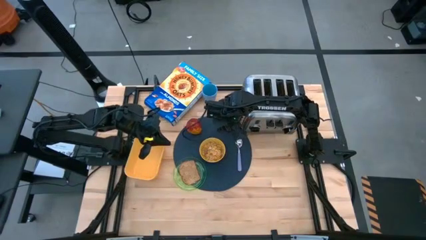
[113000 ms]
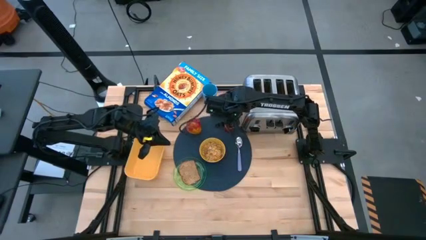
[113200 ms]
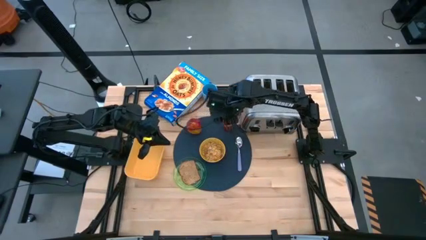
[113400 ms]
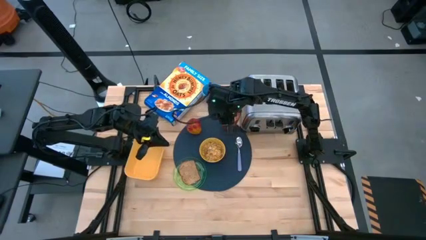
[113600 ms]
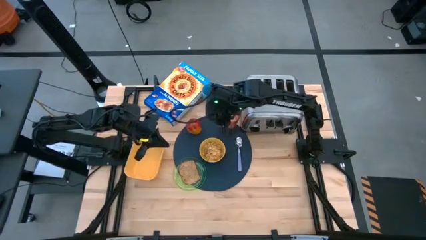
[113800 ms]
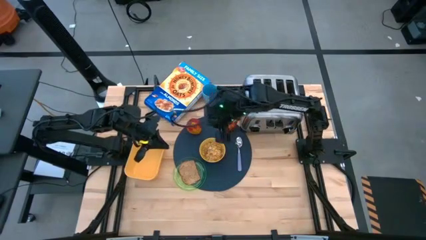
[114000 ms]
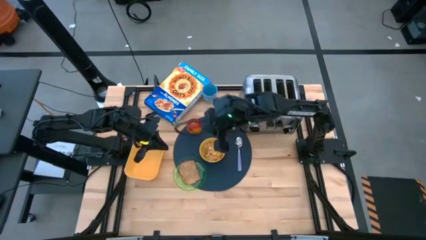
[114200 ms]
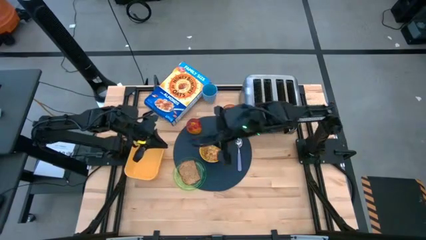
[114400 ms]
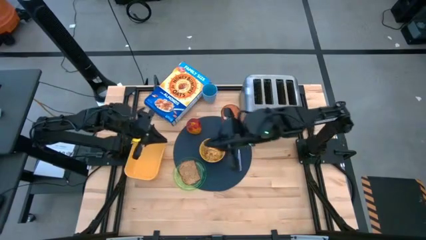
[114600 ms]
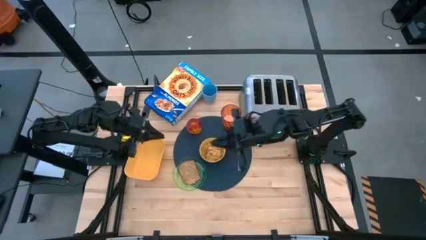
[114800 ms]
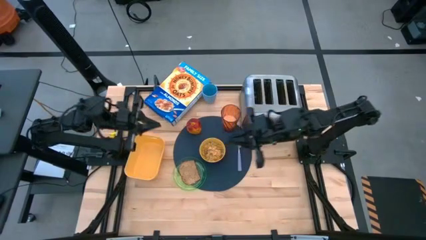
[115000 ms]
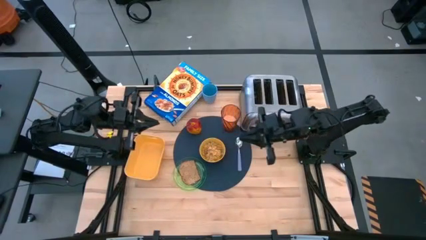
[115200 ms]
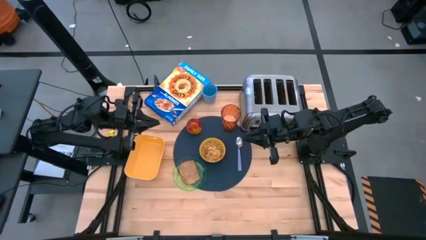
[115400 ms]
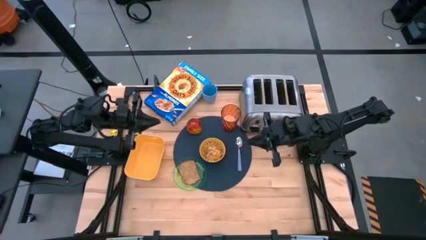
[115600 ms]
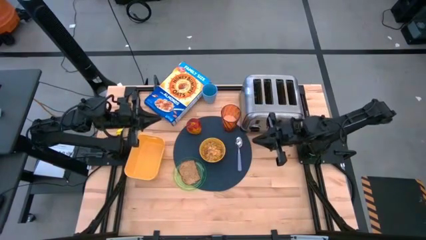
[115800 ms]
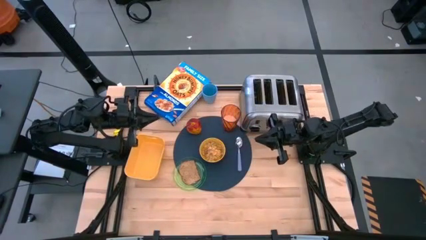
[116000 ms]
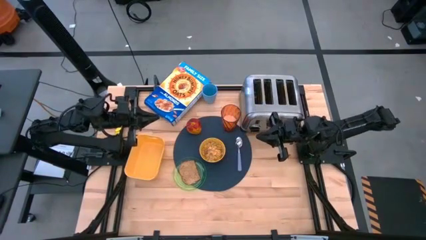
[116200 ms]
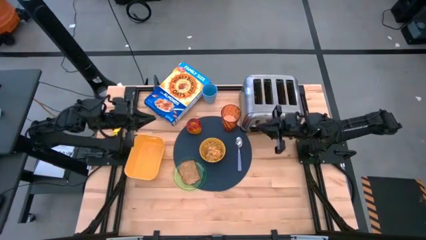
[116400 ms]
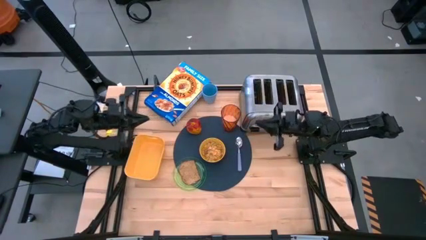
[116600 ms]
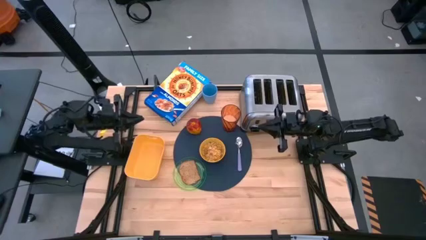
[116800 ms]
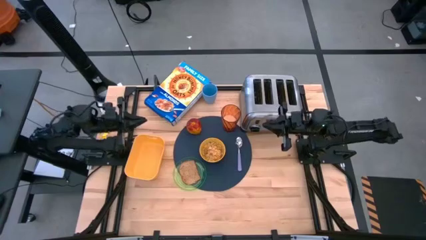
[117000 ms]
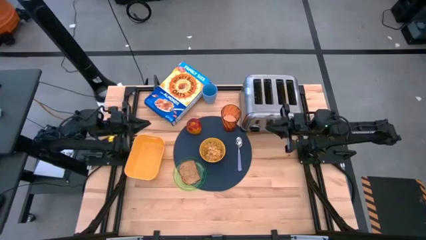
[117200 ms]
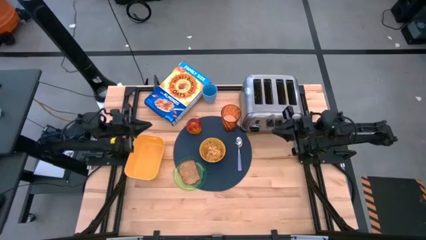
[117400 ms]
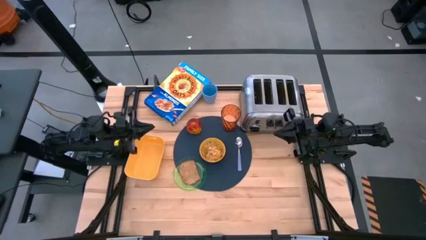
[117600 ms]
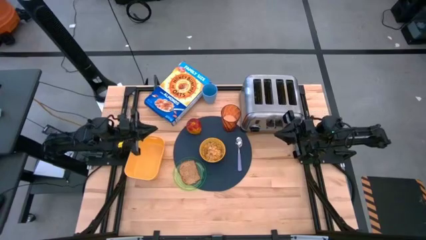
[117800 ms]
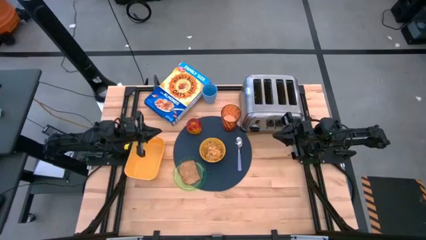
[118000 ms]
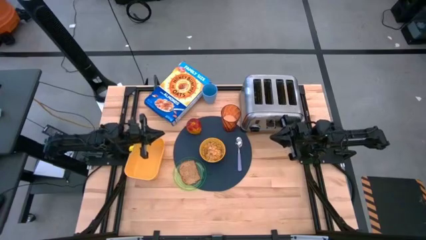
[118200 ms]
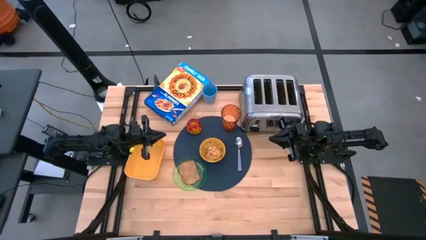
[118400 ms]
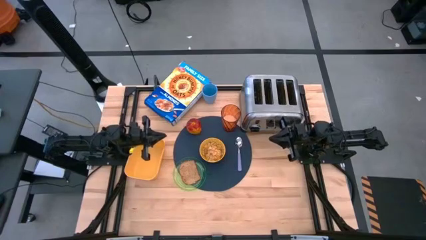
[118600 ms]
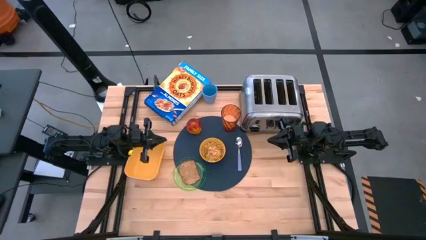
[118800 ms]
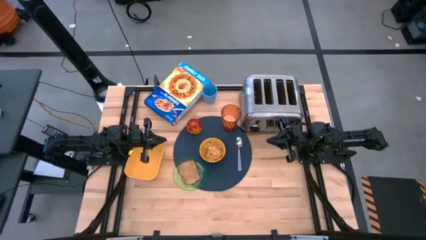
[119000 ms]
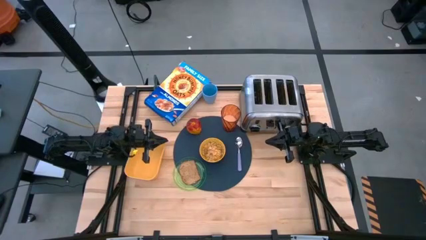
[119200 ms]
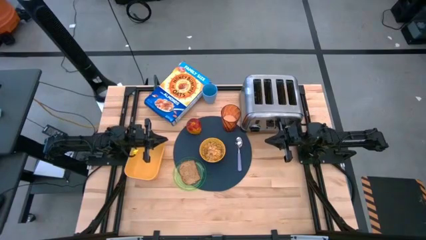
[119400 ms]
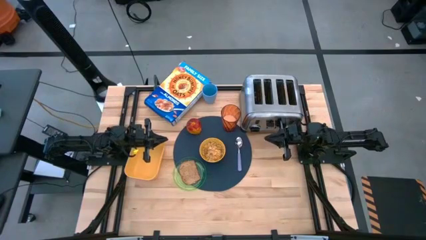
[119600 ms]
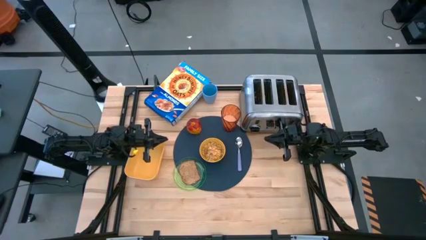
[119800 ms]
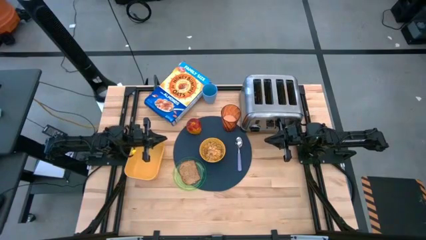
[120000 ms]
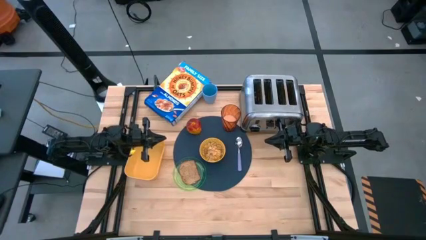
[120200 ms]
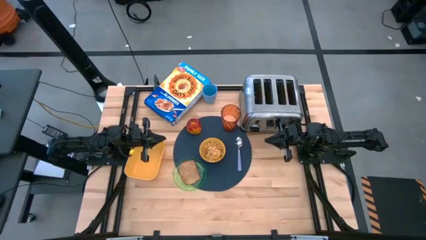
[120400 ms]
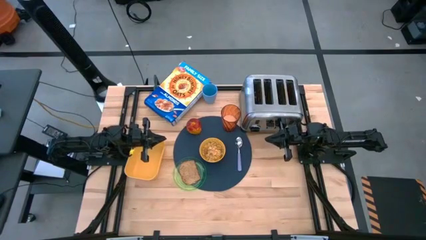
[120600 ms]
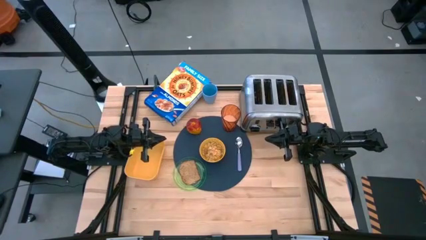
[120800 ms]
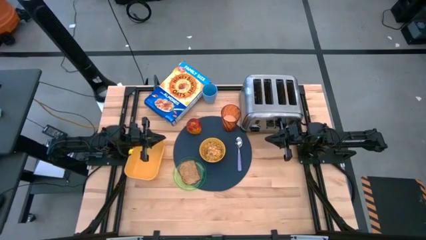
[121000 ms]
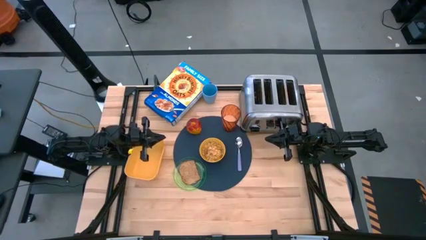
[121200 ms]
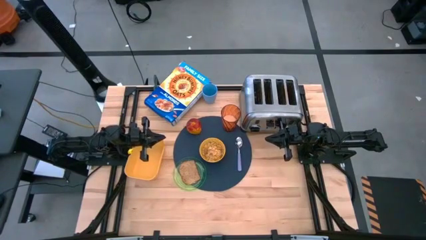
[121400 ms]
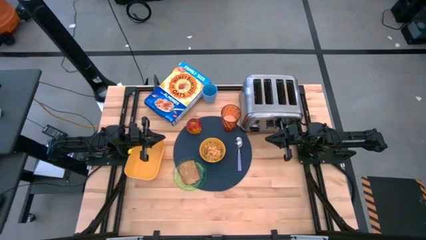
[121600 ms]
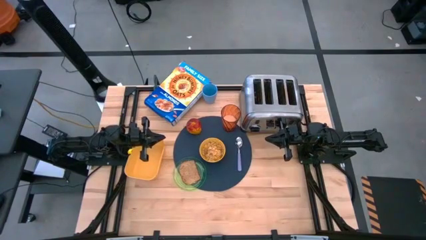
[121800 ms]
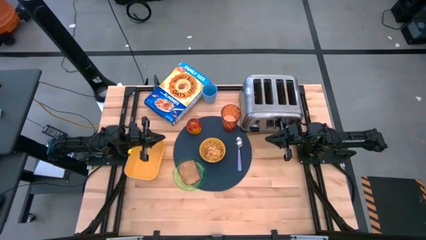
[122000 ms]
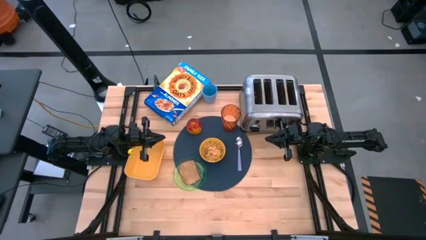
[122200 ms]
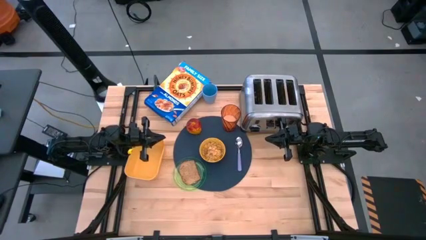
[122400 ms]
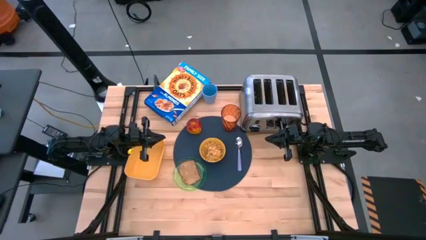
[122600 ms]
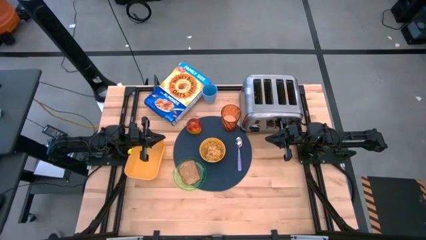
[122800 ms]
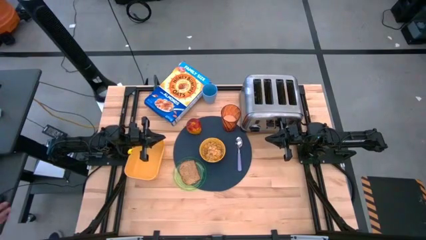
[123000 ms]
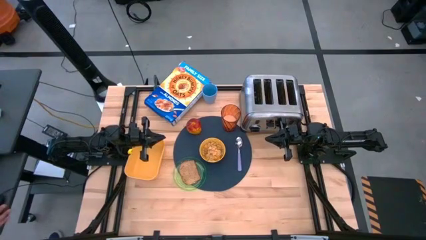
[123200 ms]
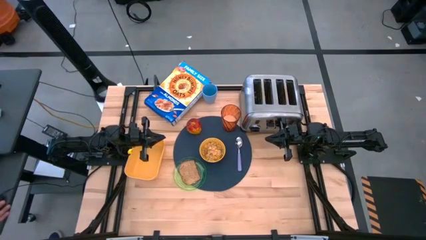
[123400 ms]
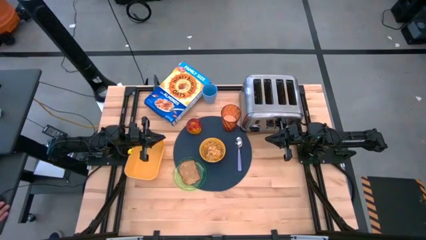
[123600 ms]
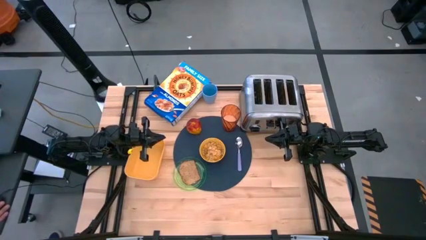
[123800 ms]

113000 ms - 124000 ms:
Task: Arrange a breakfast setting
Return to Home Position

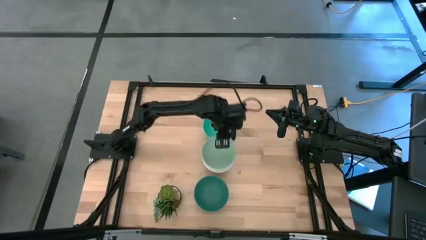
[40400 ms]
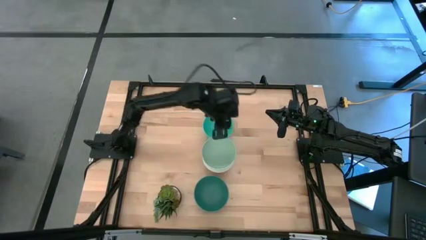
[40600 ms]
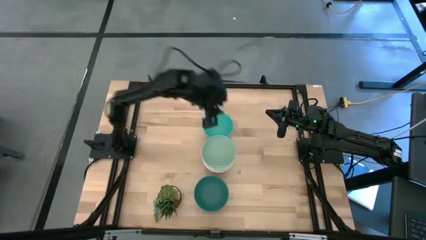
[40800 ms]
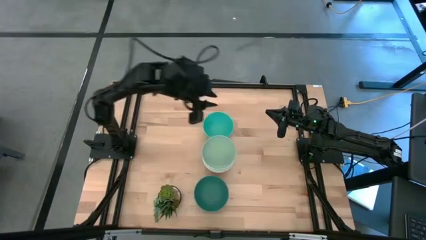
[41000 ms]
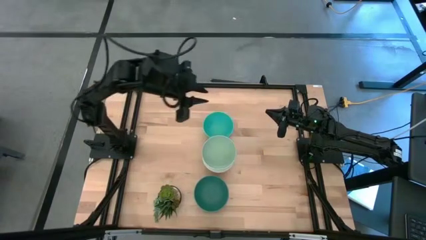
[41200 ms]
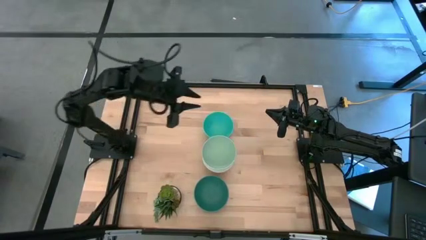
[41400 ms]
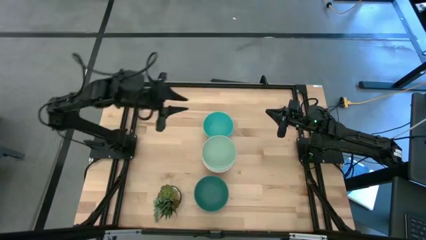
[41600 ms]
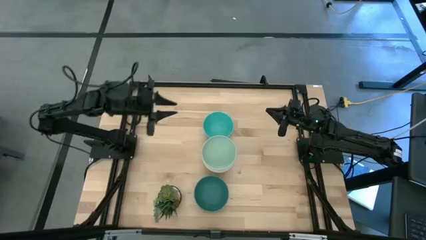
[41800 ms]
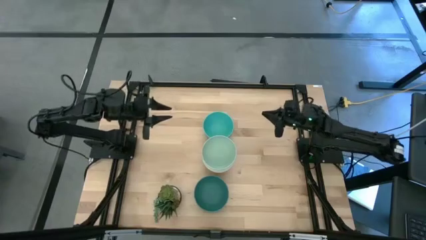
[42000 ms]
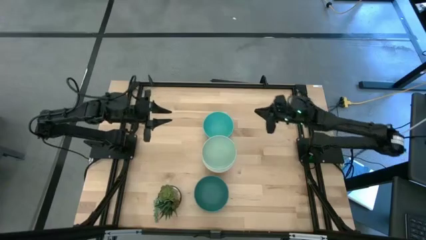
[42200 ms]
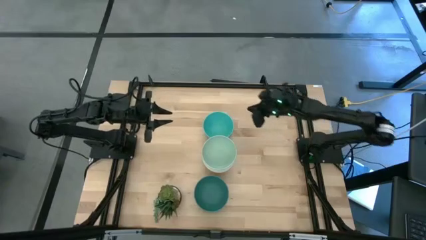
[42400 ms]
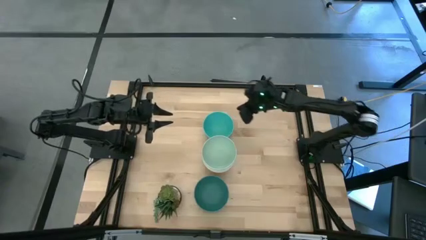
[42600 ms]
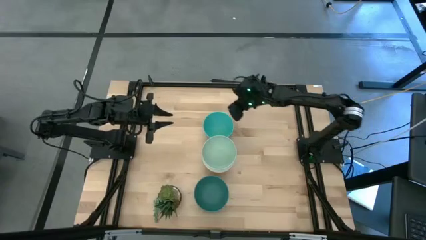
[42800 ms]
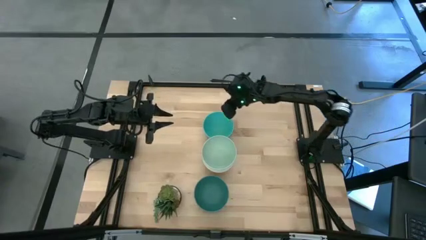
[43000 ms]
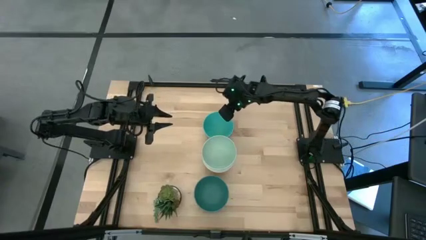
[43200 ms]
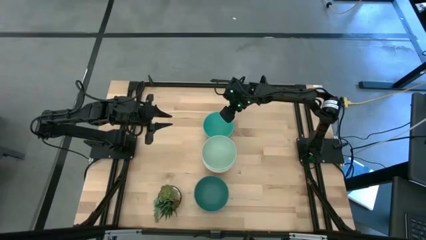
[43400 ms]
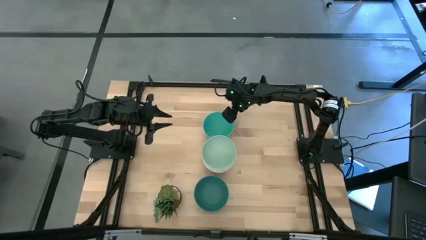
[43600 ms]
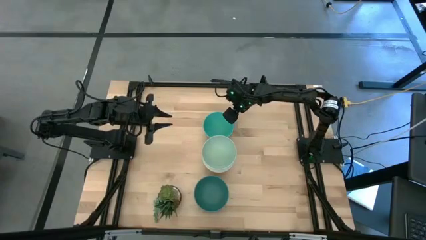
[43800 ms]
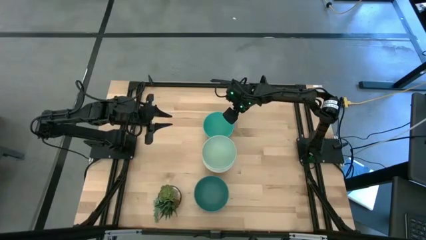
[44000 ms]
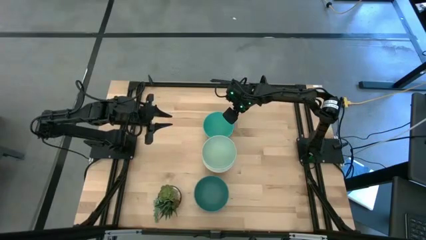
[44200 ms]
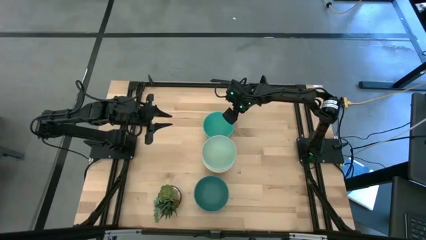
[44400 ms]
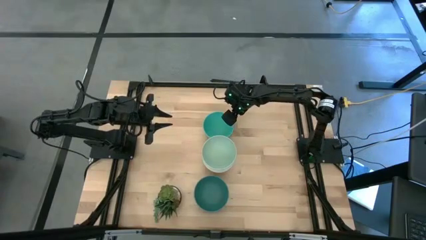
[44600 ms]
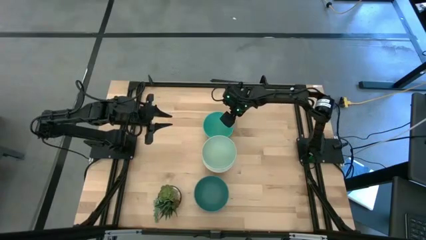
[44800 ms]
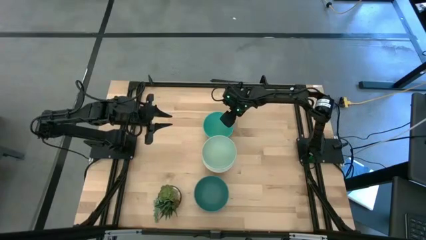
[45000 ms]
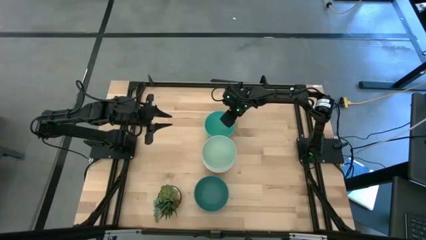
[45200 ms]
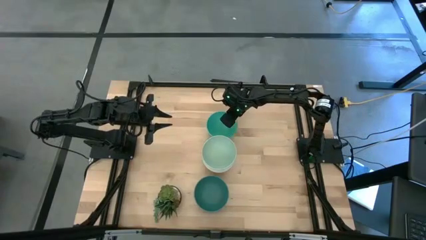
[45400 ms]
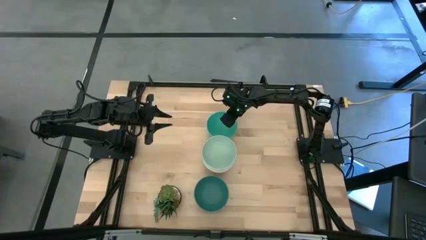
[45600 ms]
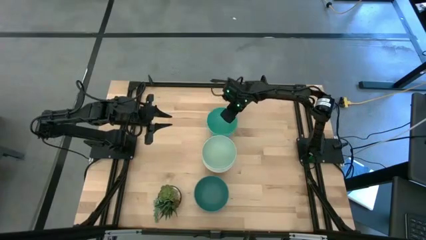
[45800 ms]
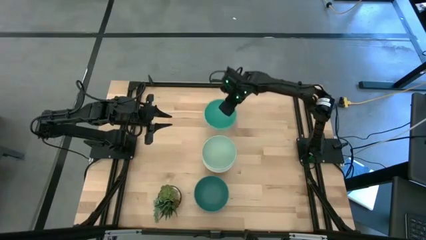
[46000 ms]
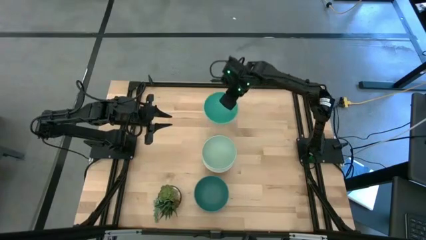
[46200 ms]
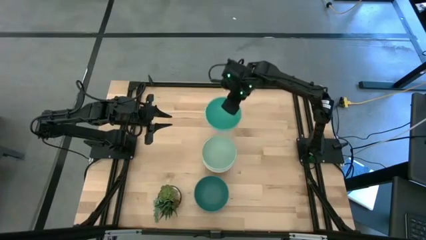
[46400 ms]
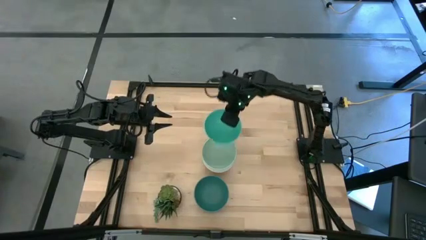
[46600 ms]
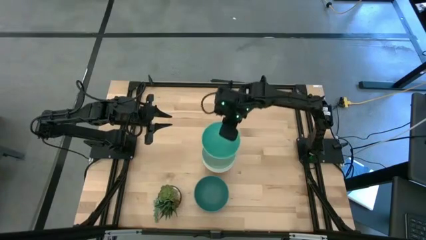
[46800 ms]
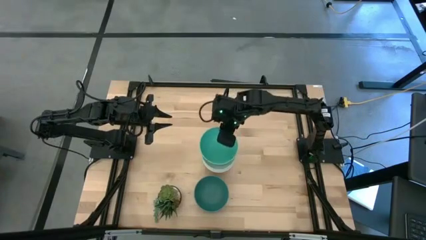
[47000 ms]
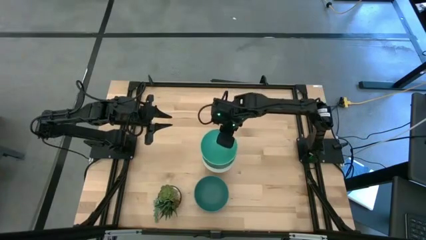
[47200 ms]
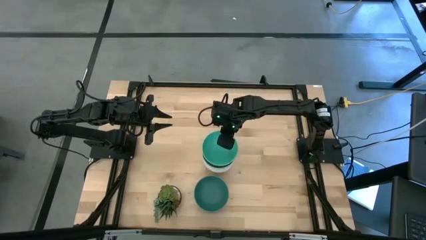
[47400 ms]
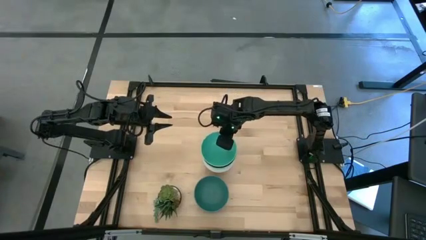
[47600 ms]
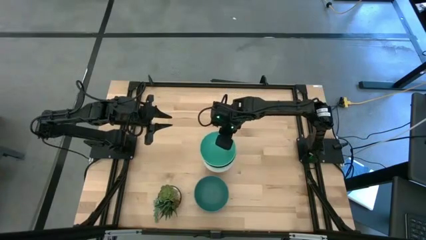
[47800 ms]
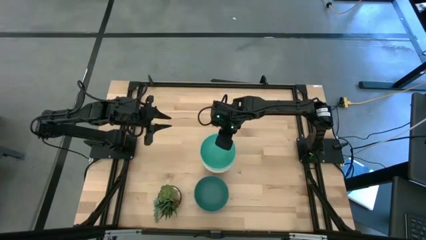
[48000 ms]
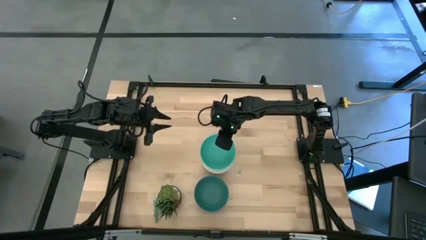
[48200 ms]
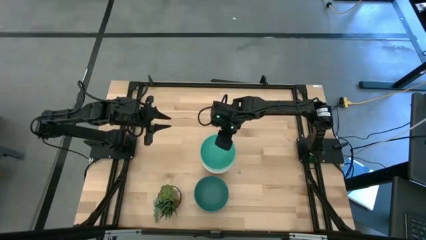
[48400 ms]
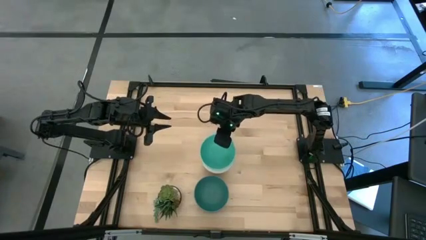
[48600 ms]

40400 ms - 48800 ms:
Task: Nest bowls inside each other
Stack the blue bowl on the light green bowl
